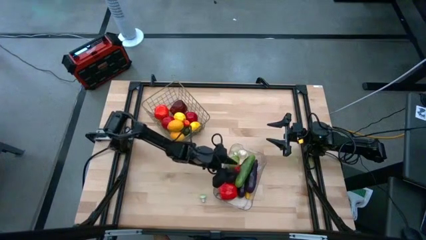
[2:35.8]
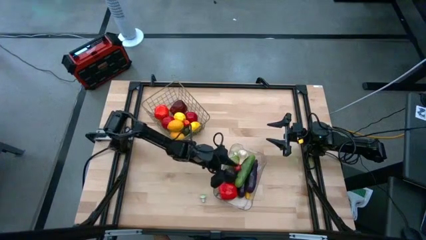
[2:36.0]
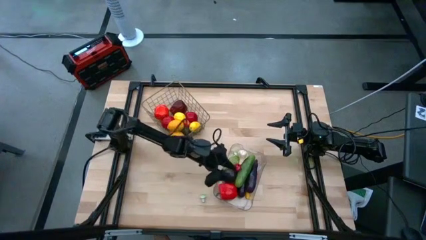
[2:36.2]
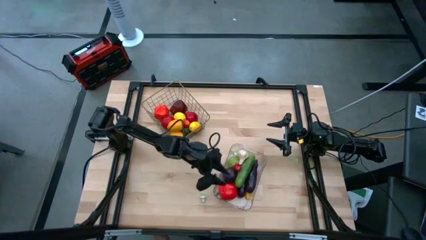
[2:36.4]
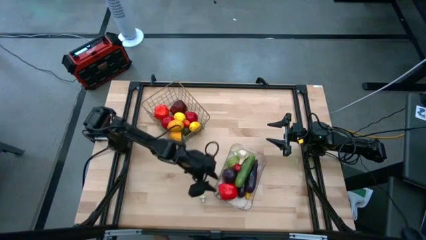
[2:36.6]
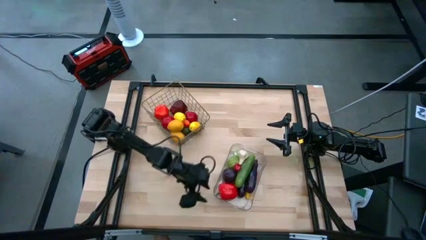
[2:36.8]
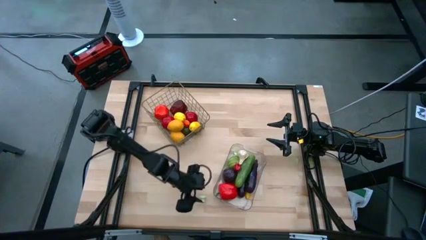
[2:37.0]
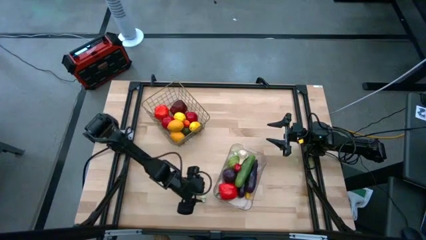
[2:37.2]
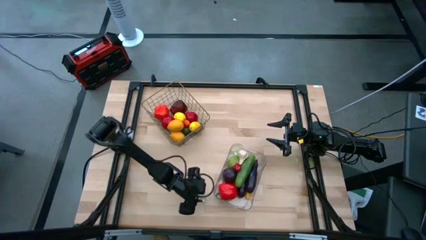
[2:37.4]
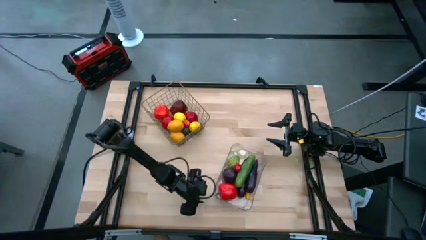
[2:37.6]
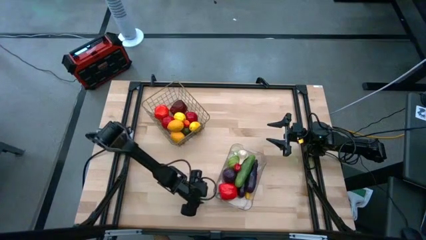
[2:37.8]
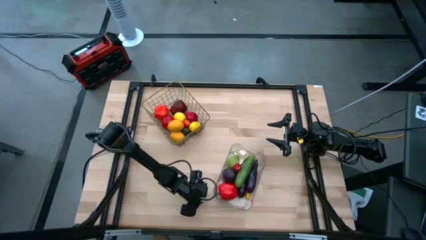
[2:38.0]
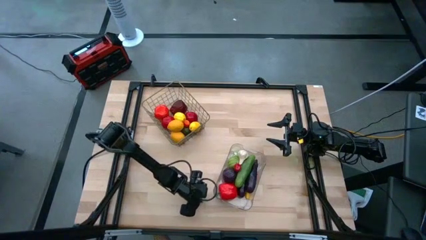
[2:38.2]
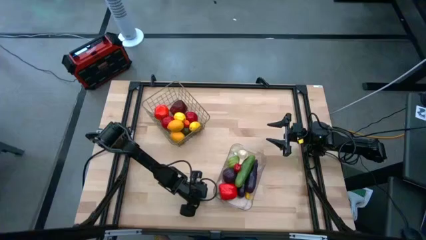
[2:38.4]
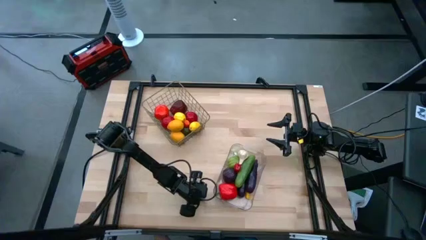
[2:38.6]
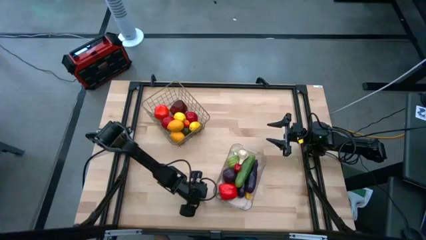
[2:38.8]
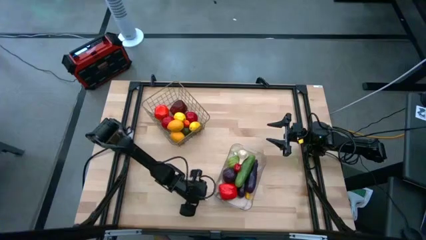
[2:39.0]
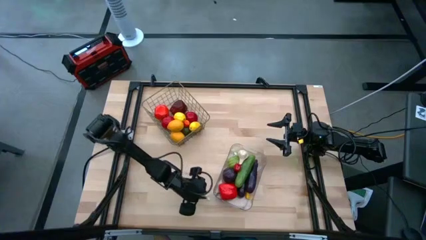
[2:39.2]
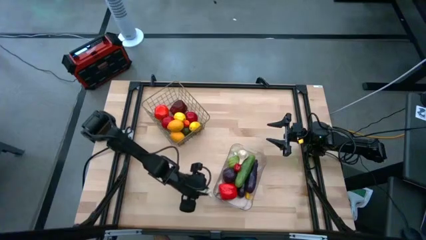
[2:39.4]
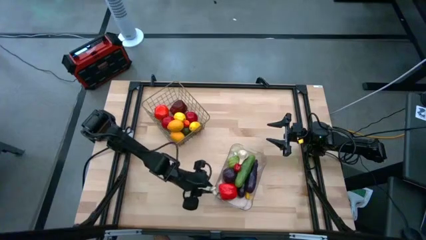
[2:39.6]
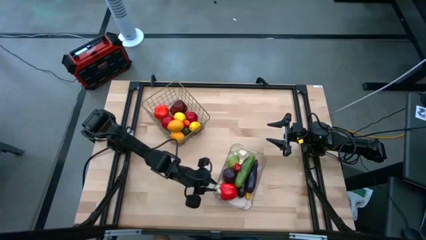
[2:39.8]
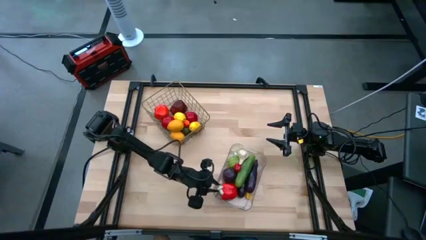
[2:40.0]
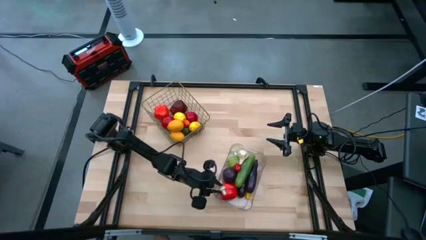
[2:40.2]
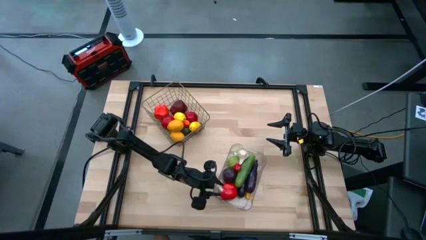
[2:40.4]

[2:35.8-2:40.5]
Task: Sort produce into baskets
Put the green mushroom into the transparent bin

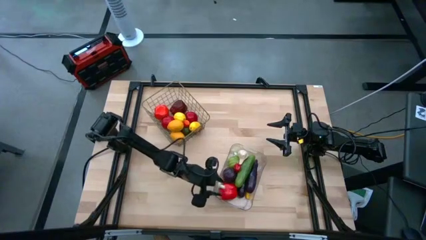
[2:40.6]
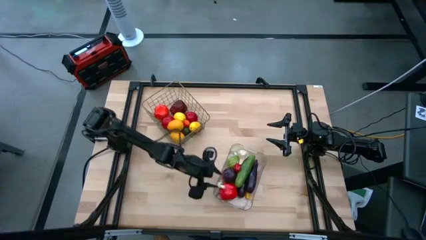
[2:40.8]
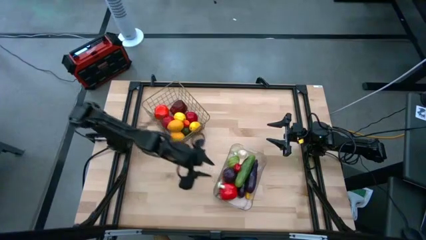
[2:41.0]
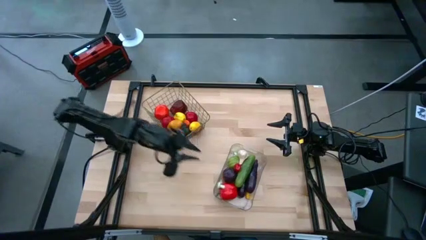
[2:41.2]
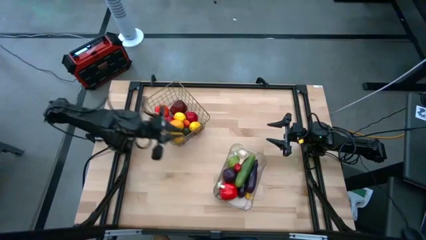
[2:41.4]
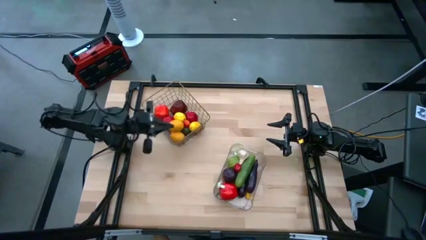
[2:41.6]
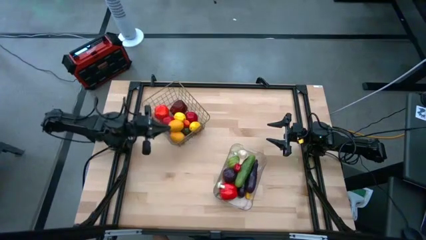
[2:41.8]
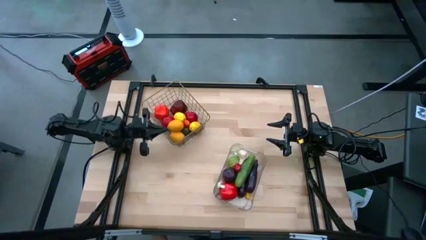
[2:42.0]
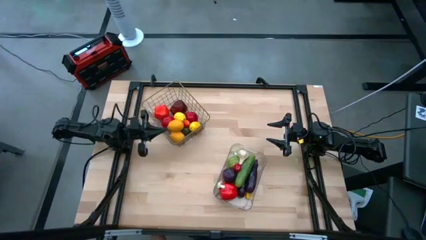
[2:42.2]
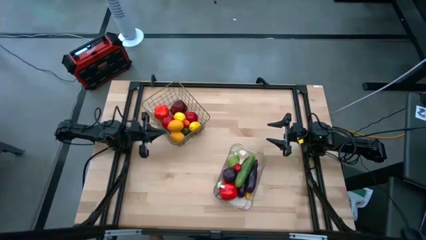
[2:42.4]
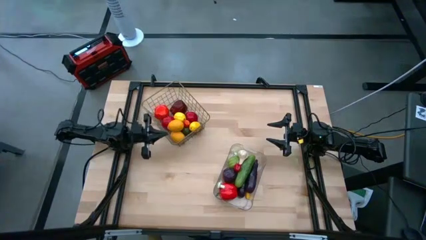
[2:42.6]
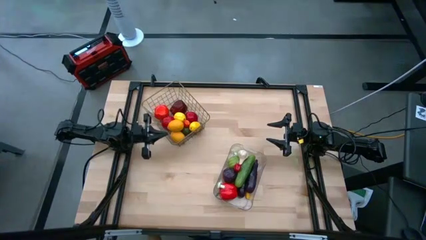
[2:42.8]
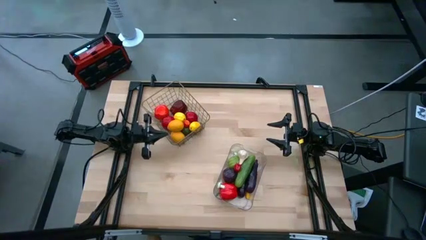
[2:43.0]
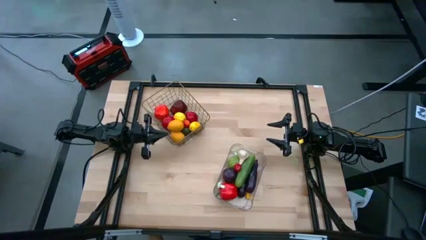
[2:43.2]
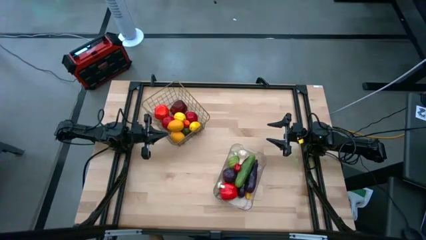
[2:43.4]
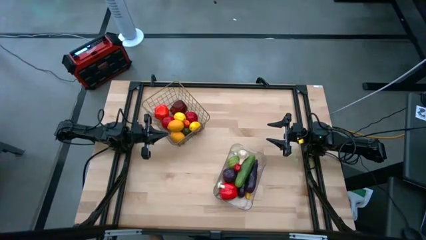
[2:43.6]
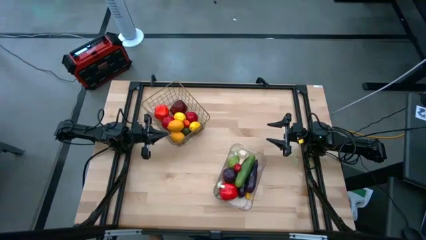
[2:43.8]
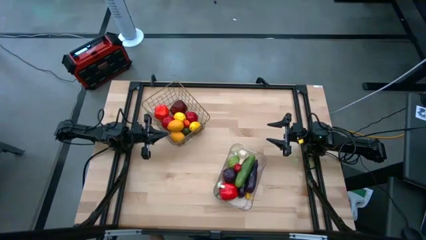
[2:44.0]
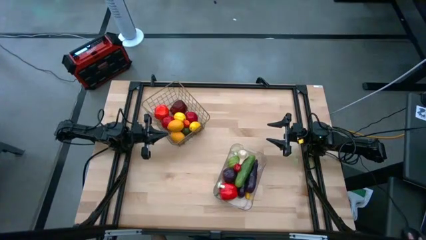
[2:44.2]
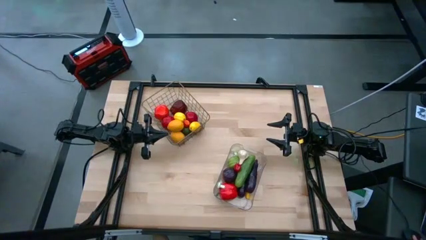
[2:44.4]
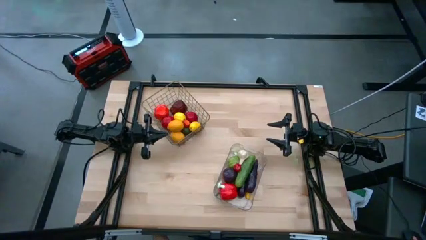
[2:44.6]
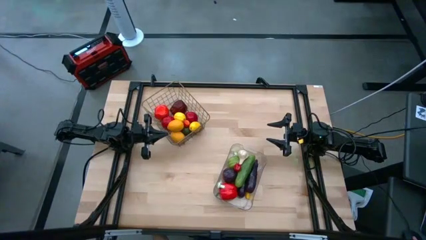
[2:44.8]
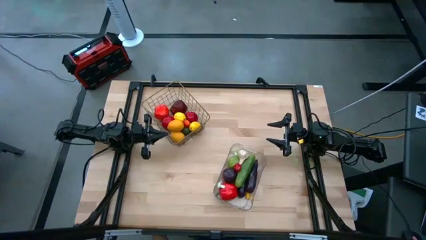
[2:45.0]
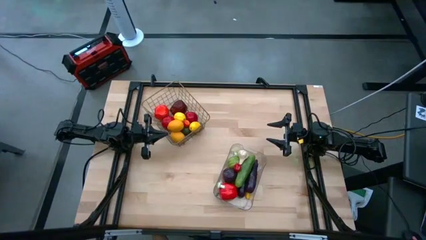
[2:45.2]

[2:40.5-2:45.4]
Return to Home Position

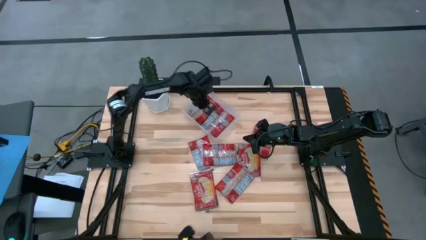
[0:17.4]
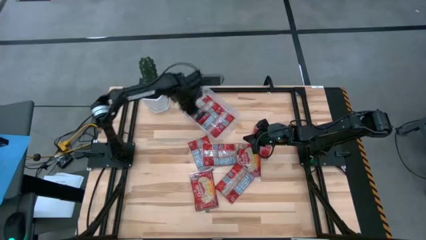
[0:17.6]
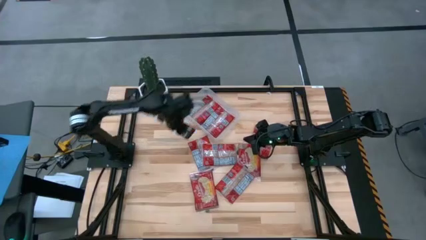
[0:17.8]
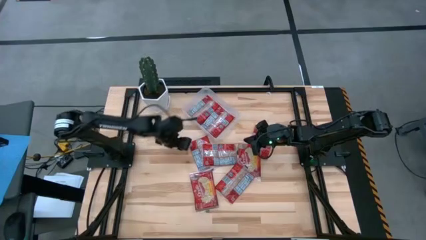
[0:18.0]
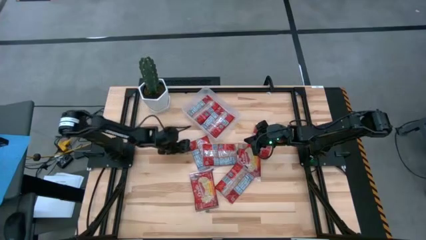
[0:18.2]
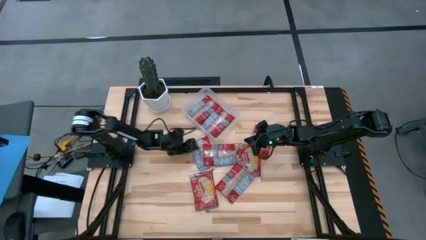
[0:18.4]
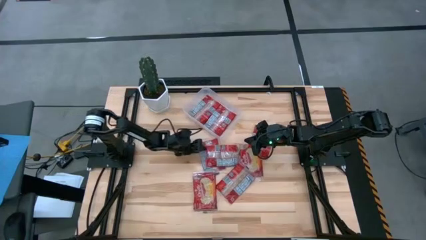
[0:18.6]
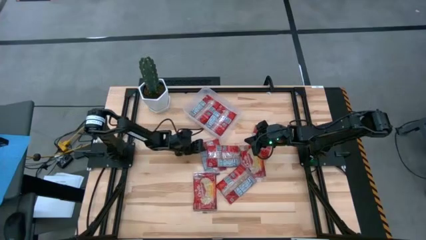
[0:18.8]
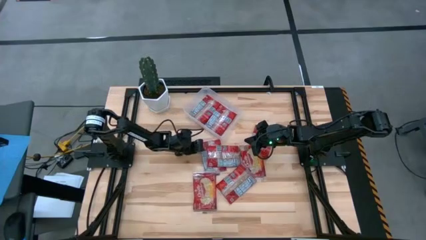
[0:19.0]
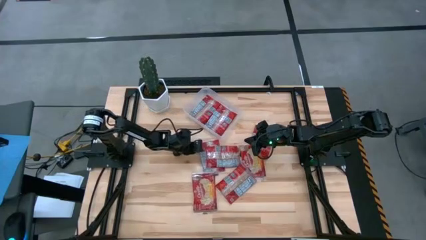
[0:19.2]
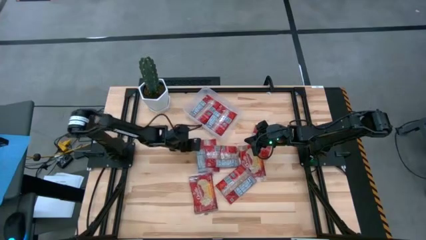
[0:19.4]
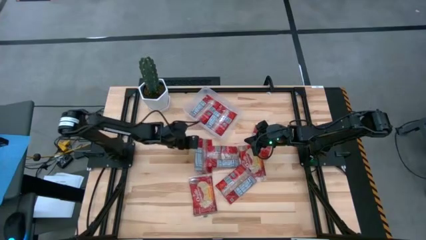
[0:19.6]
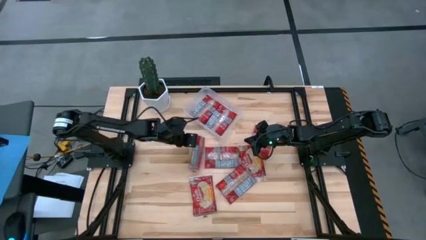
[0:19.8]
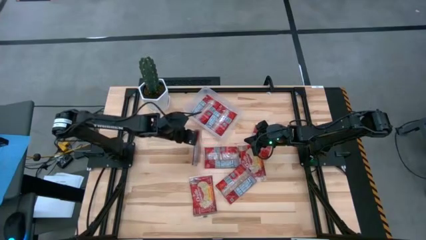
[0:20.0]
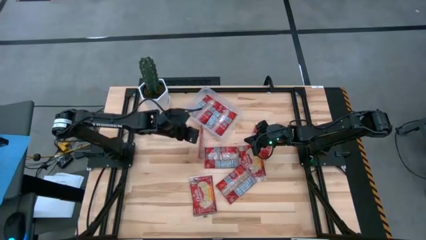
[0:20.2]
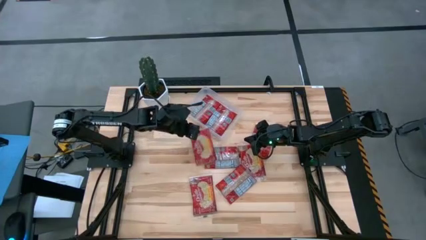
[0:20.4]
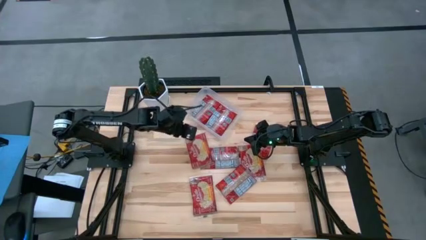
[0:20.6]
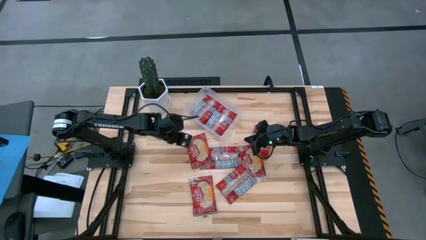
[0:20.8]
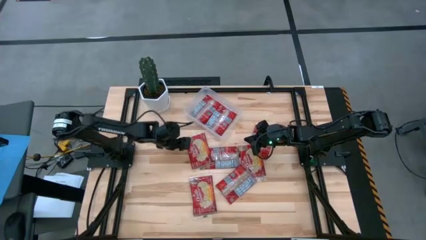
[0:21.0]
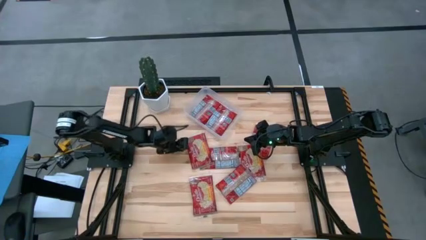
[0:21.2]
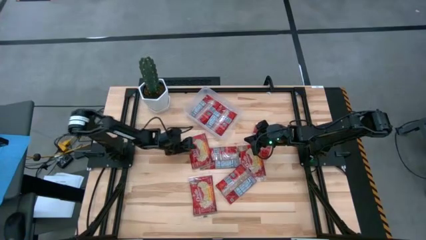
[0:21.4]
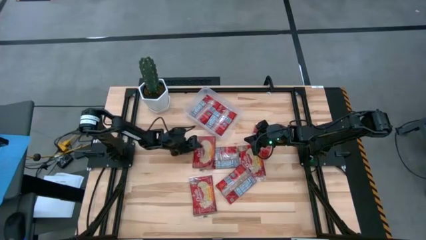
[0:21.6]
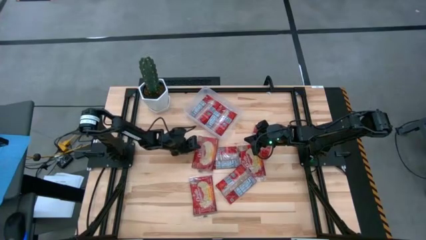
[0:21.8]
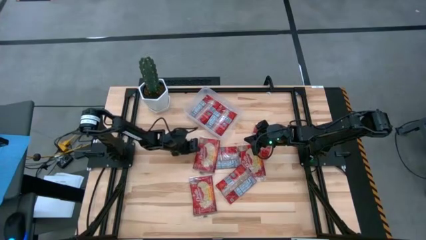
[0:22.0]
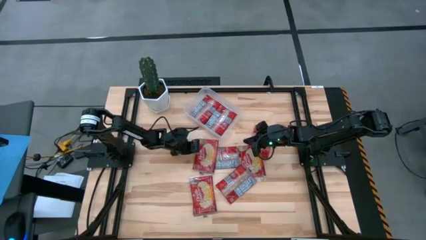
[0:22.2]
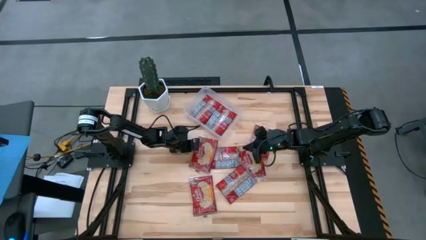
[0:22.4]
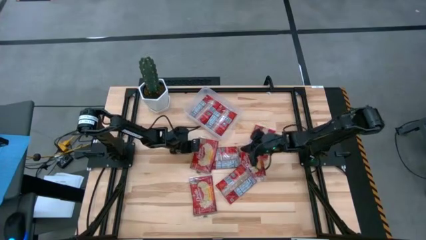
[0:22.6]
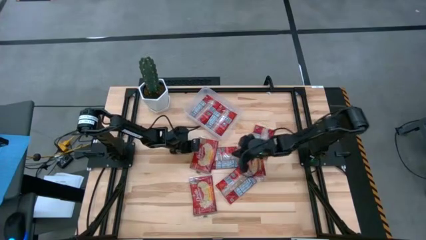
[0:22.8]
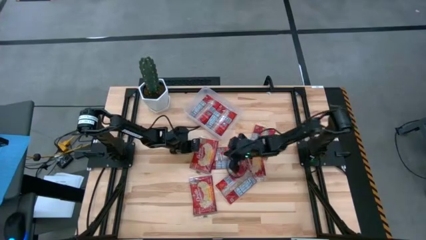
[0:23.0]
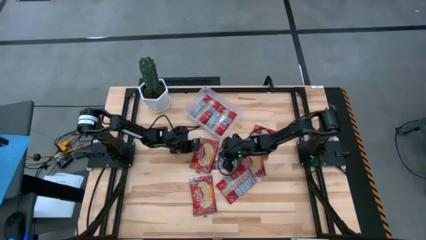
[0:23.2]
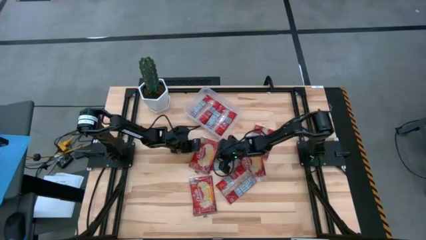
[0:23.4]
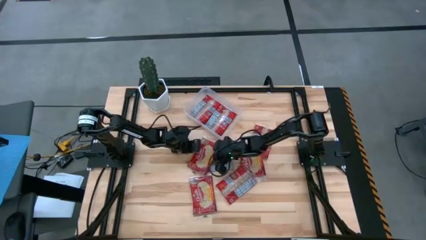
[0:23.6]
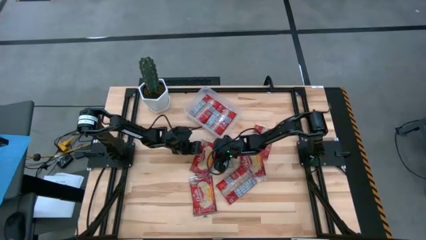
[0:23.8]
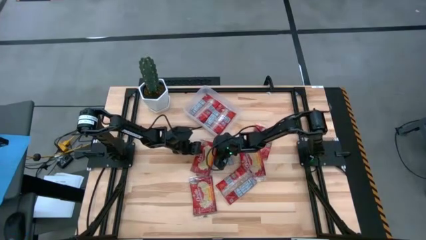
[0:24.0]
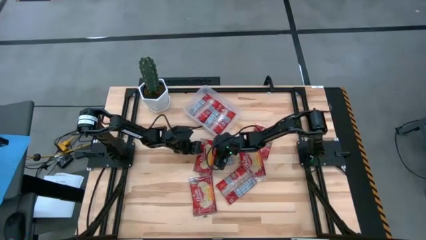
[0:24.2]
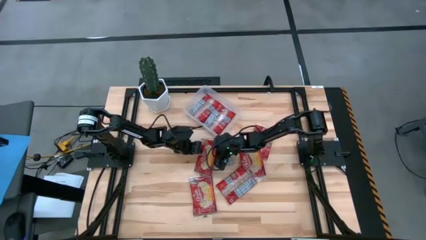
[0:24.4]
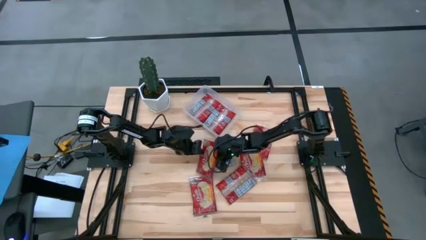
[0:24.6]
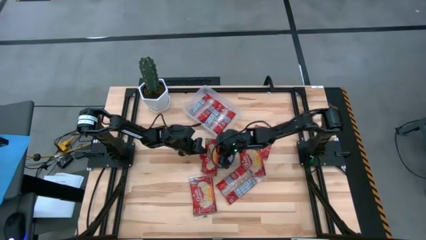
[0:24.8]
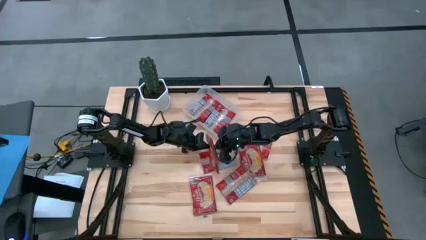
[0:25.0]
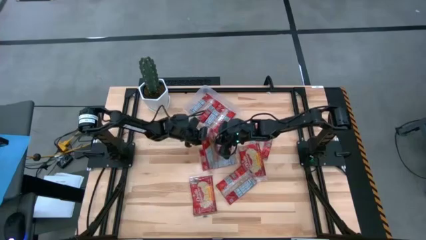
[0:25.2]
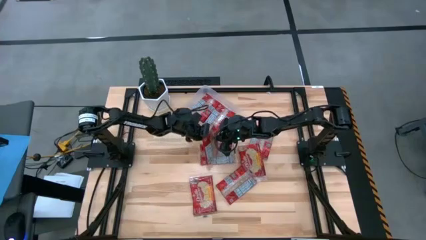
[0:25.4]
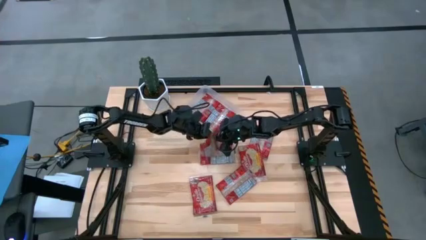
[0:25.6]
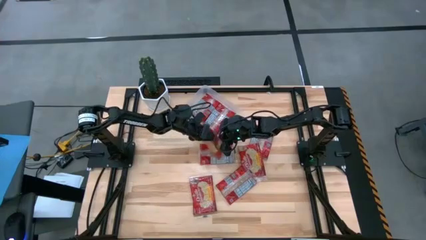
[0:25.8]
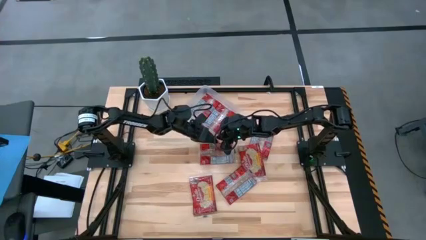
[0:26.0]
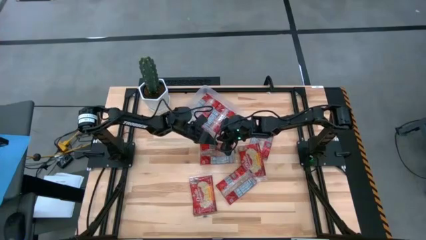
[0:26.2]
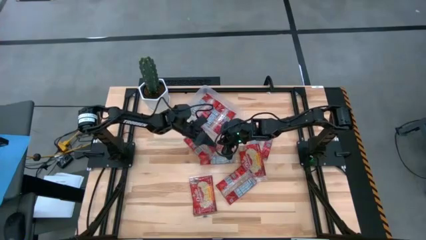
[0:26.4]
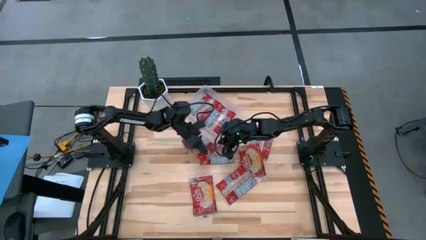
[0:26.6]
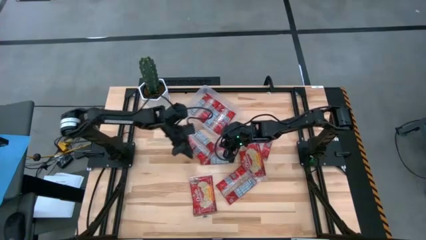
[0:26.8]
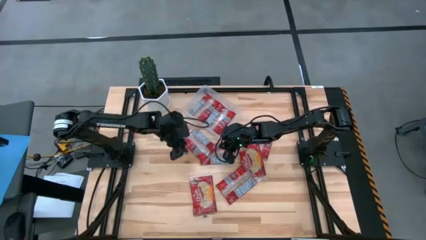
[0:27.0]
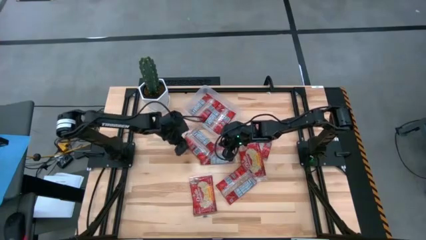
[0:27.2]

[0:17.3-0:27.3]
Task: Sort popcorn bags into baskets
Put the red popcorn bag into the transparent bin
